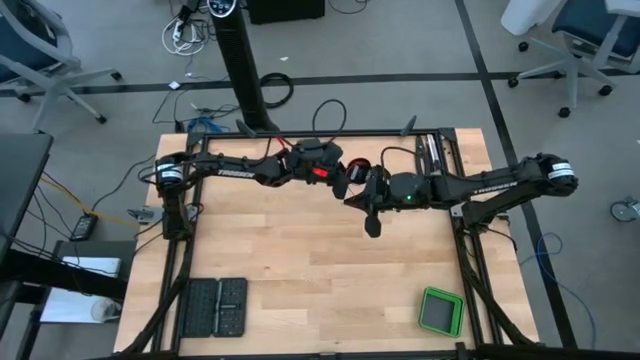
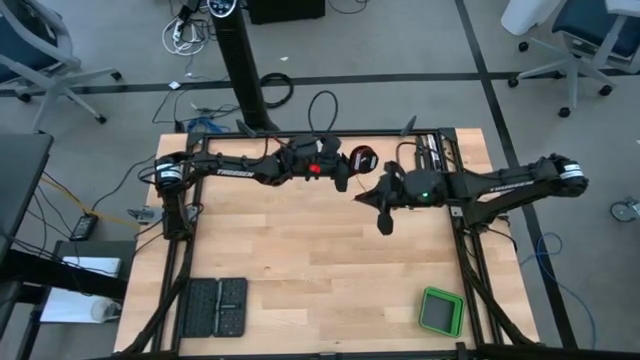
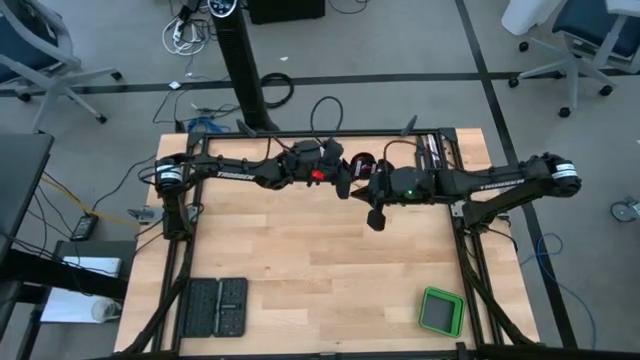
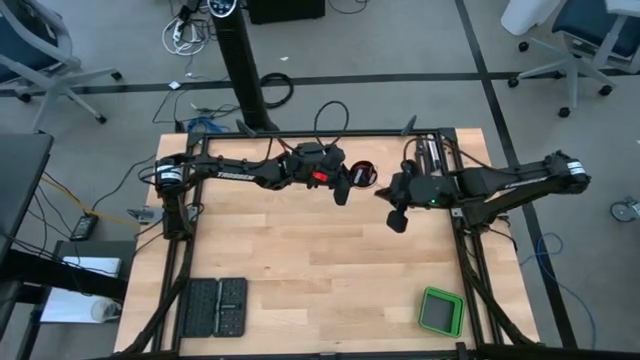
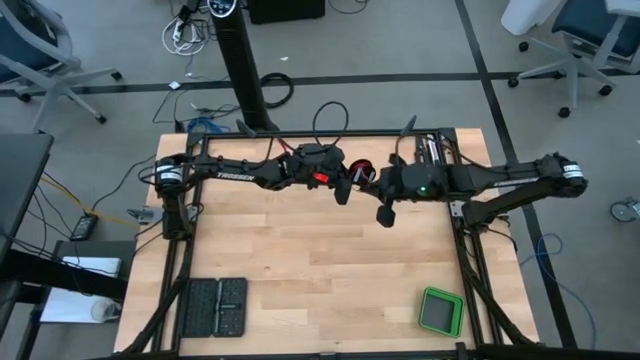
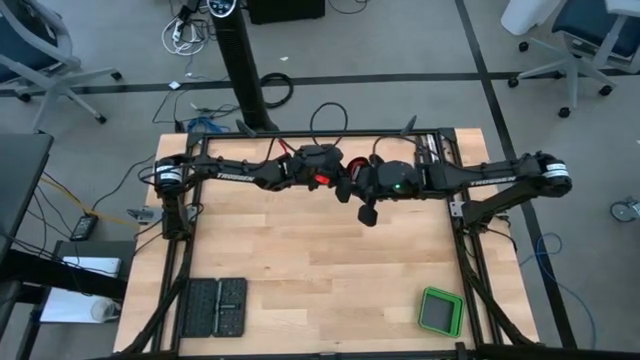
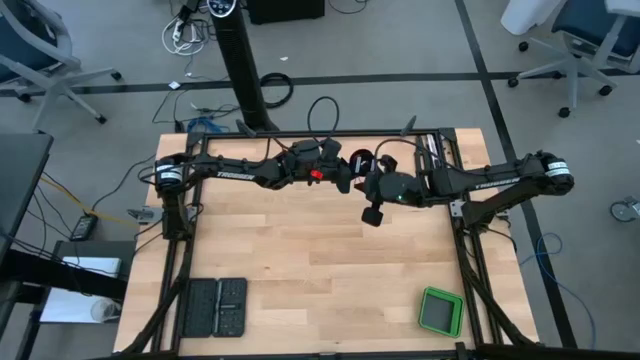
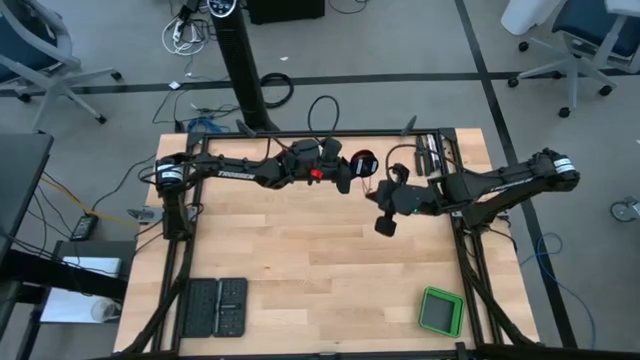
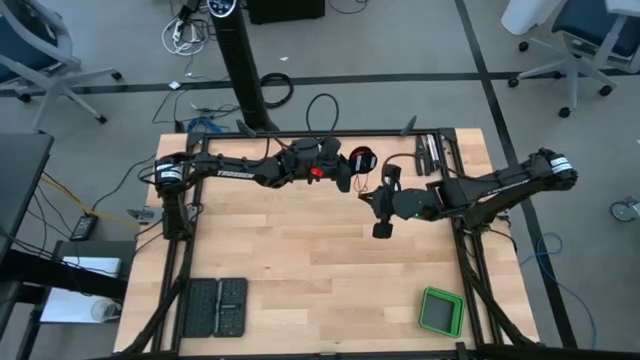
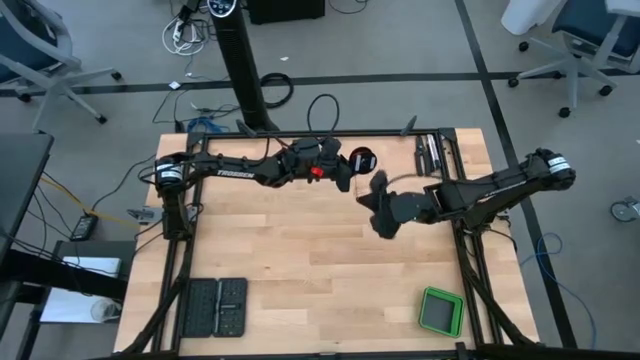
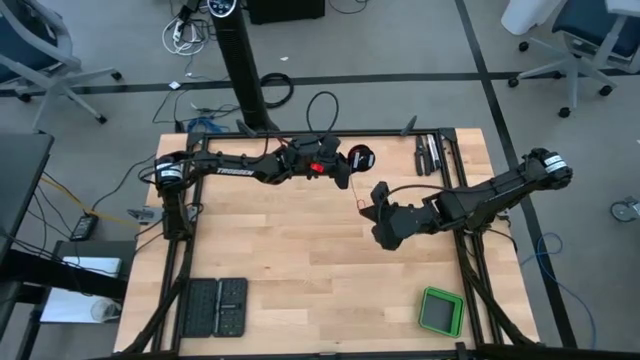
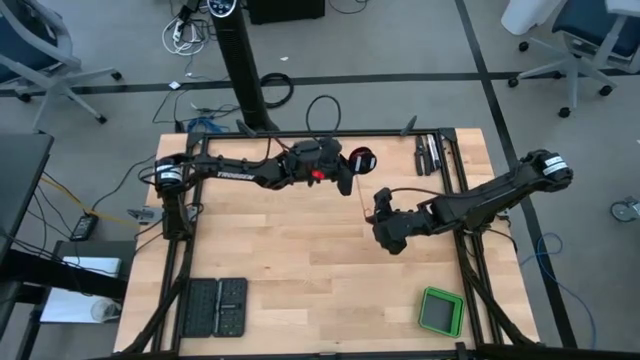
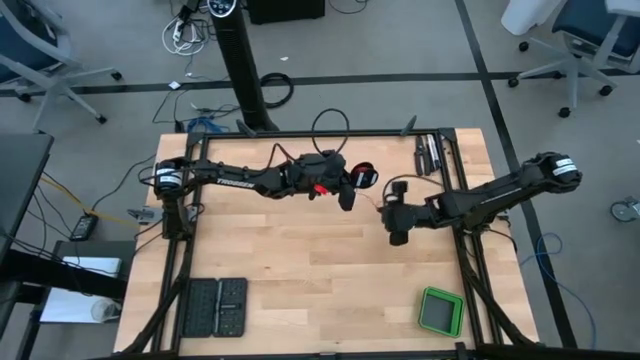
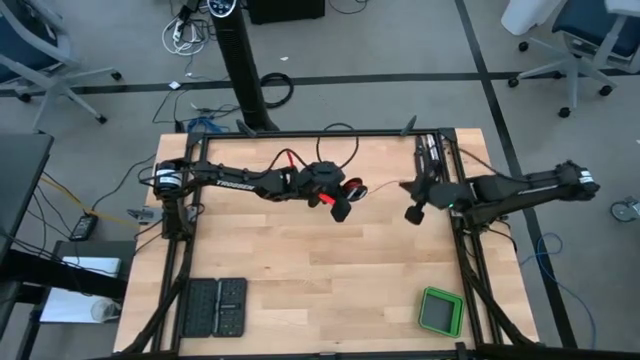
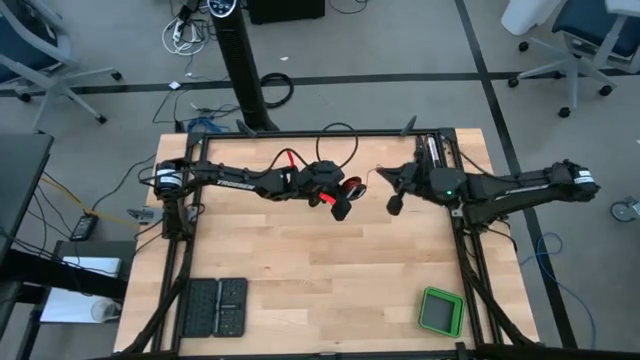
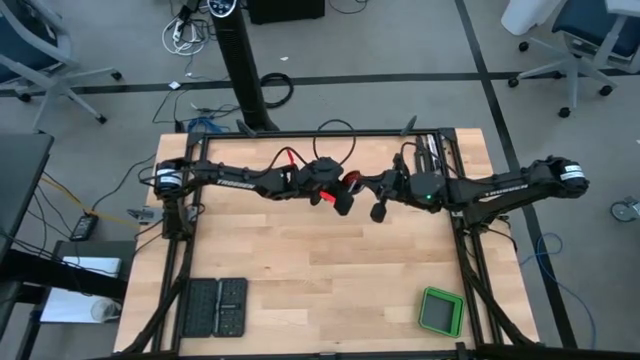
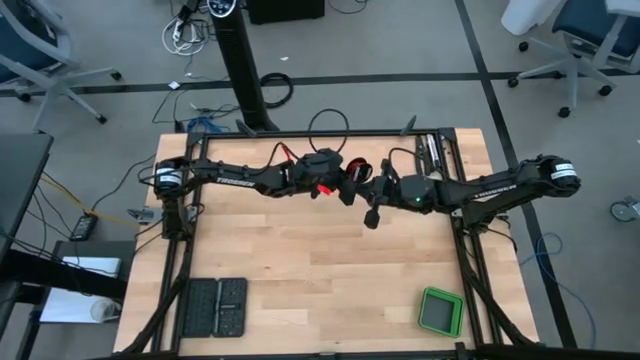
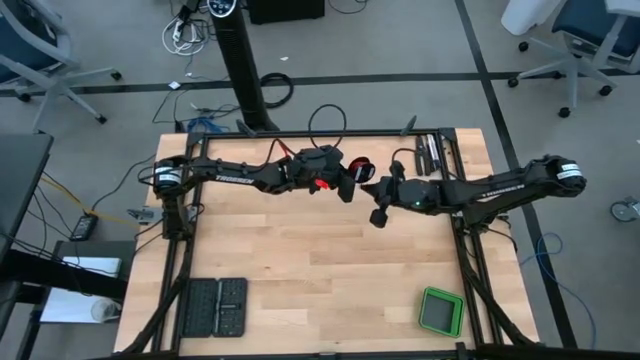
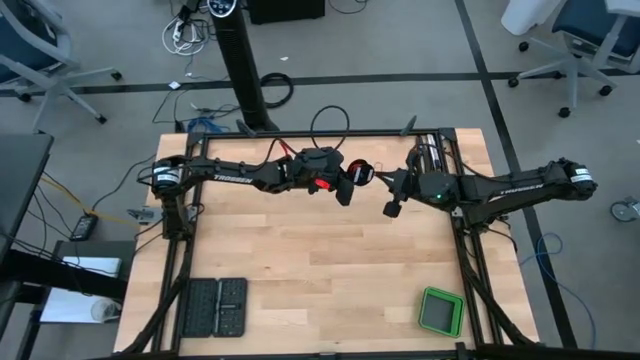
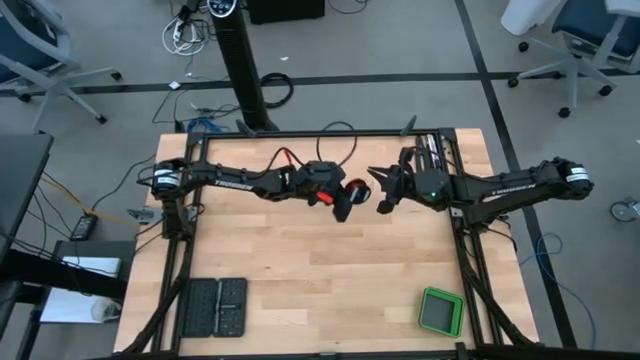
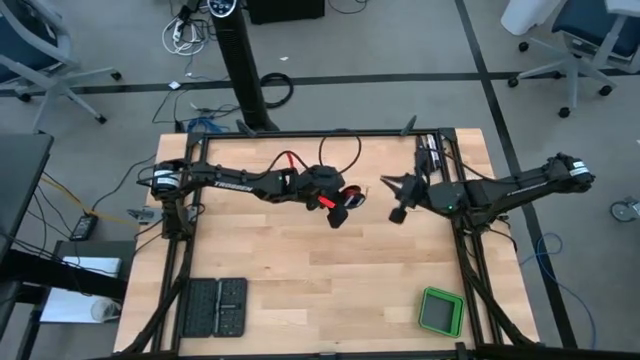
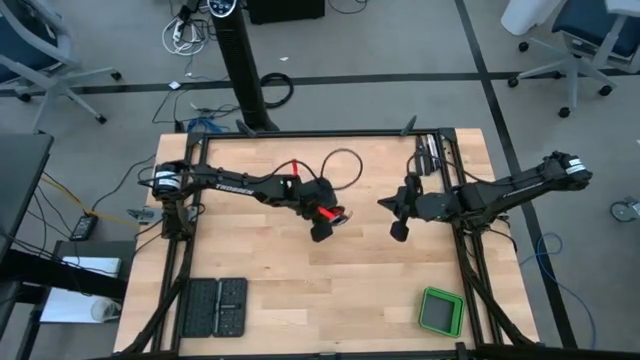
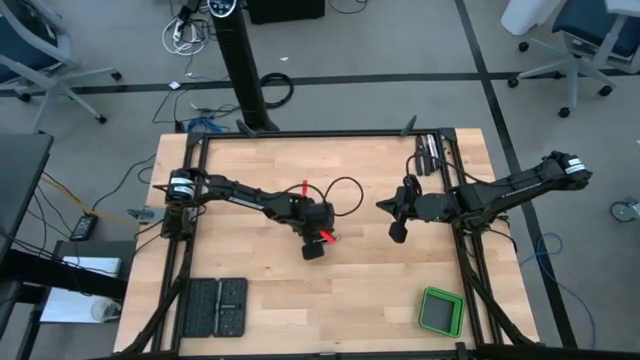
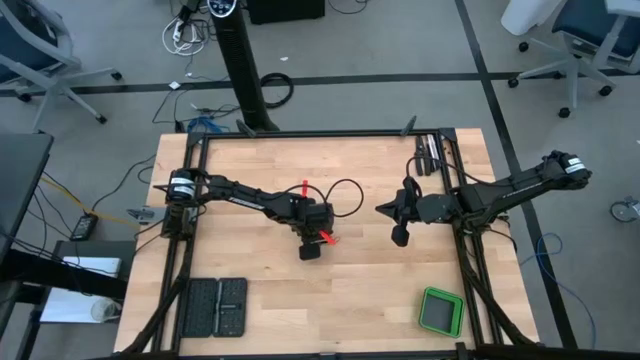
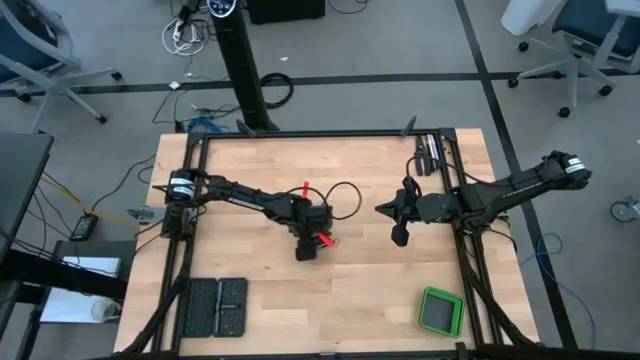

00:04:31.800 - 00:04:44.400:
Task: Coil cords
Coil the wire cable onto the spool

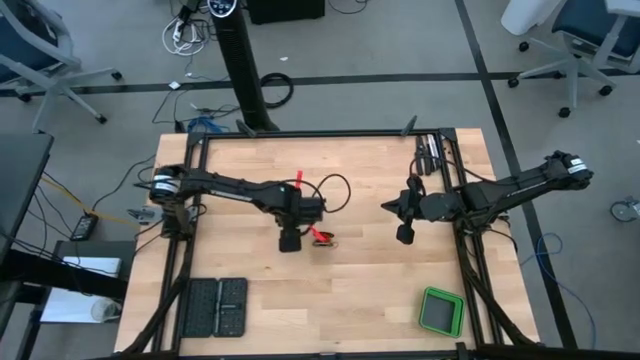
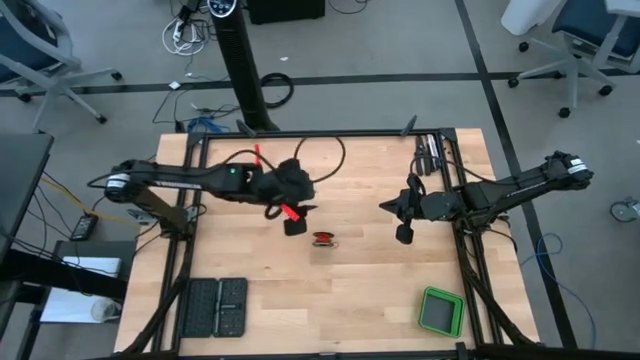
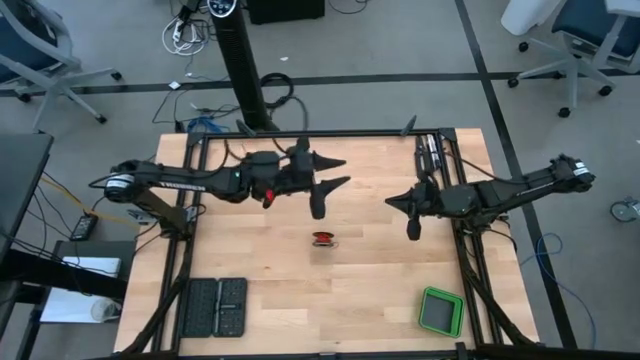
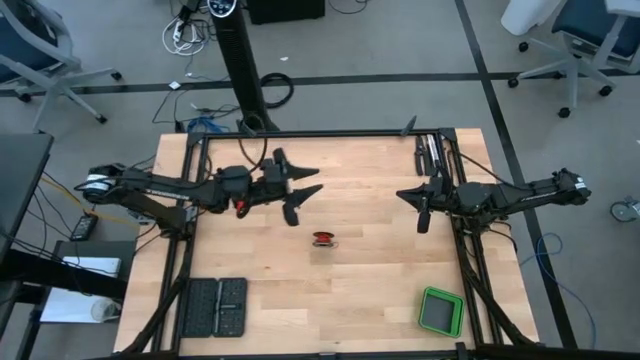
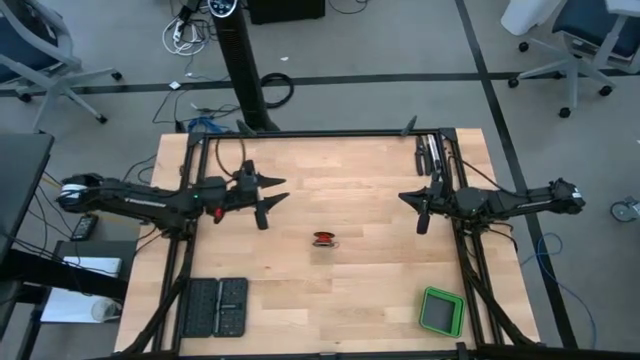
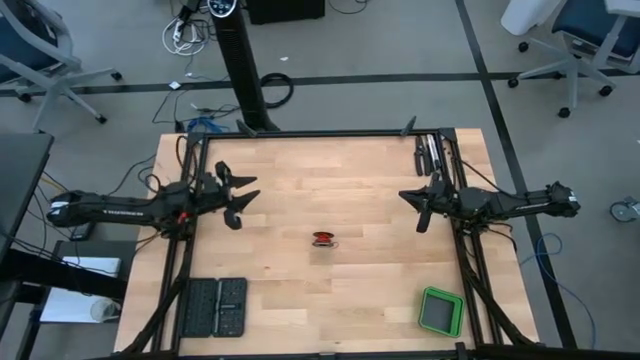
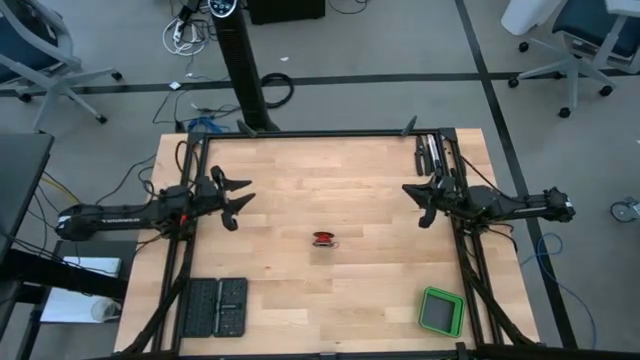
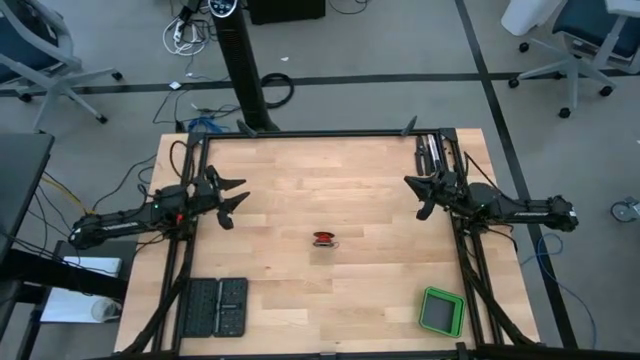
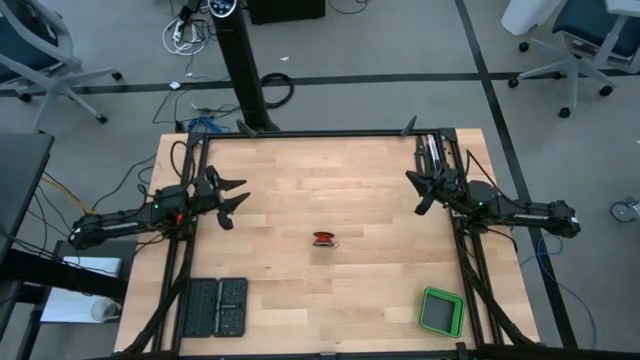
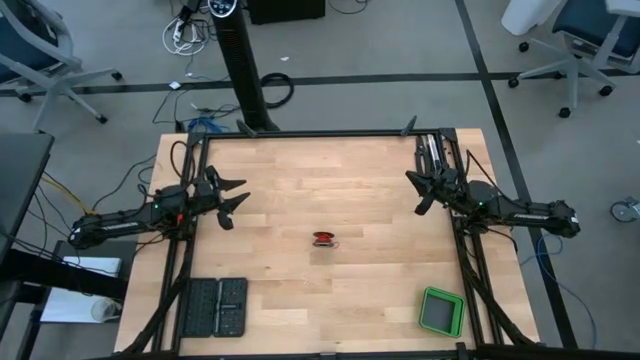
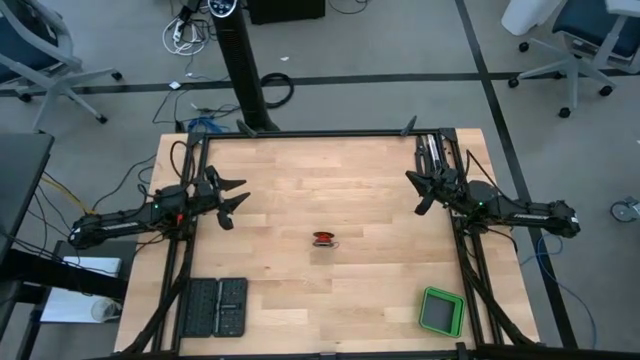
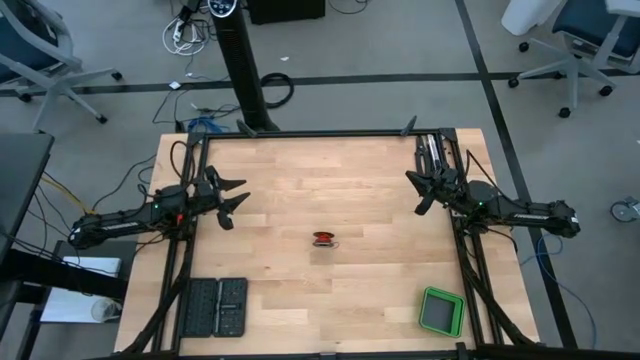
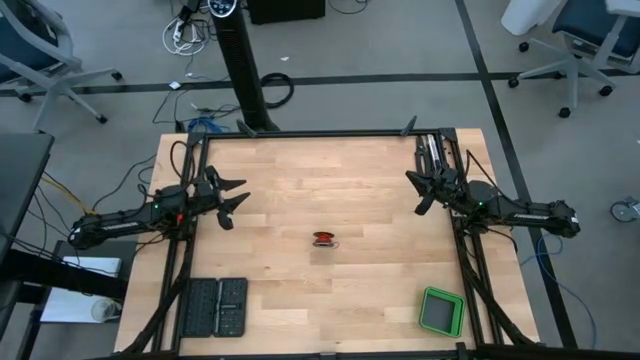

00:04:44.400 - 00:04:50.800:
Return to Home Position

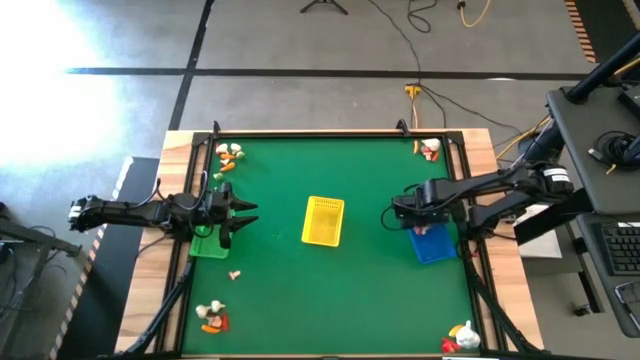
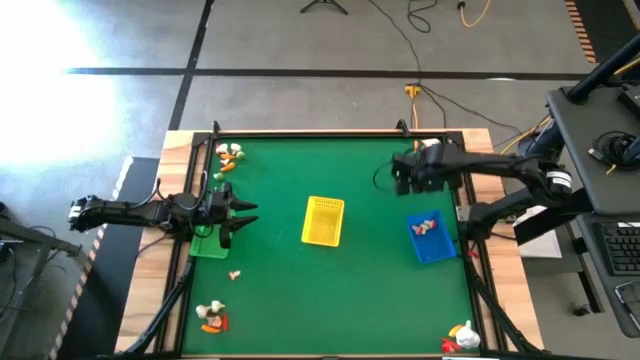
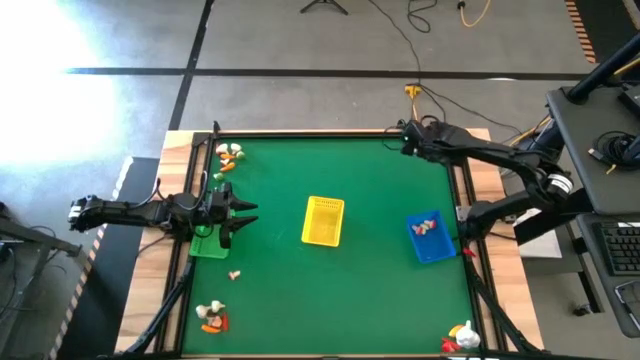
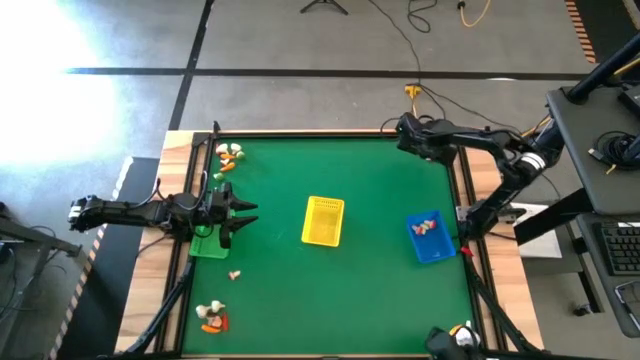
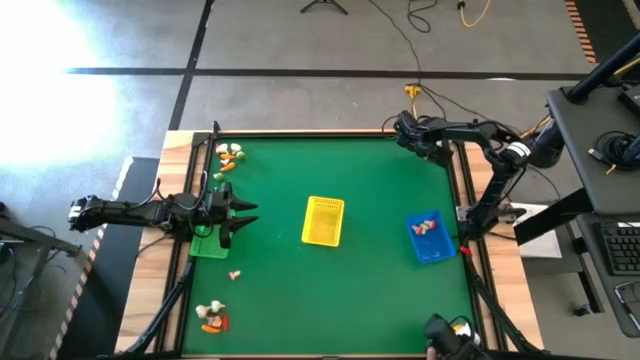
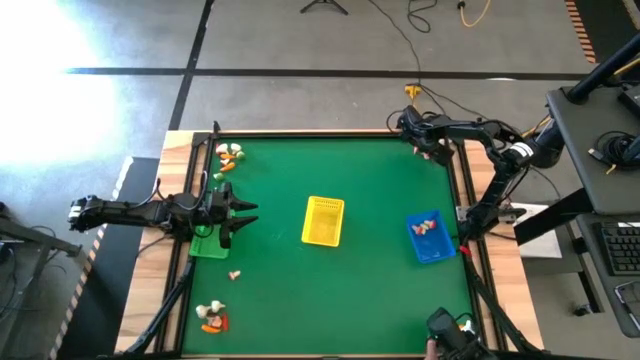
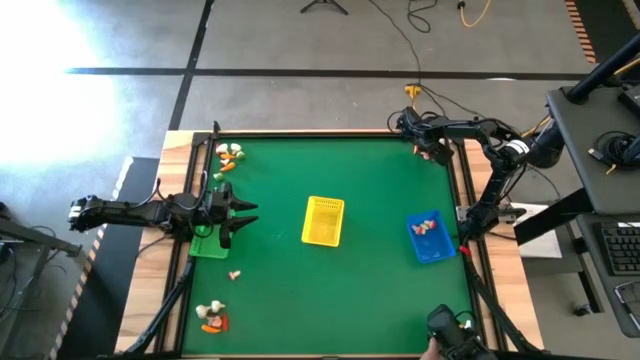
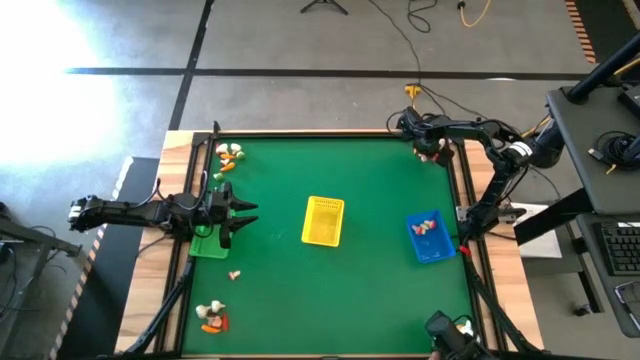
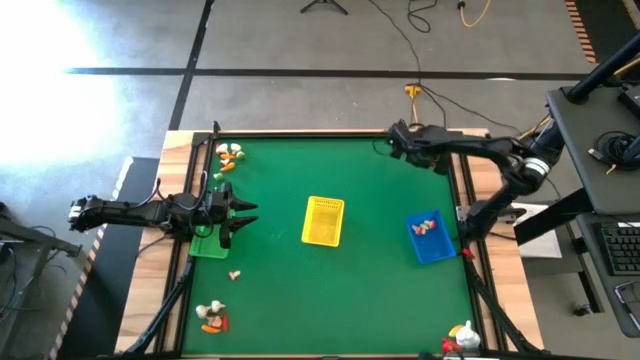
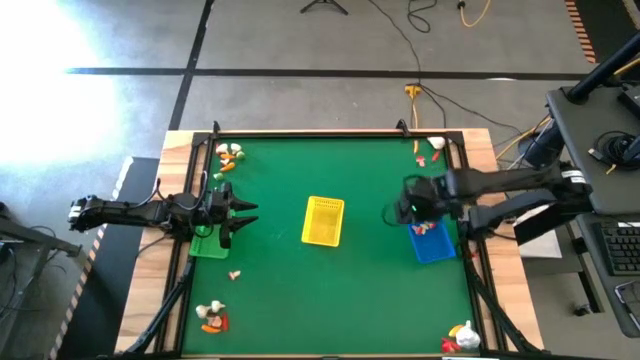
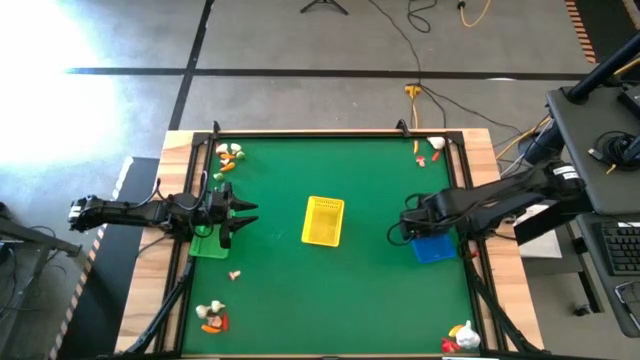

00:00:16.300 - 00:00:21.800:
Task: Sort produce into baskets
Put the brown mushroom into the blue bin
